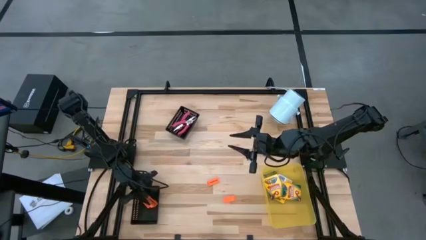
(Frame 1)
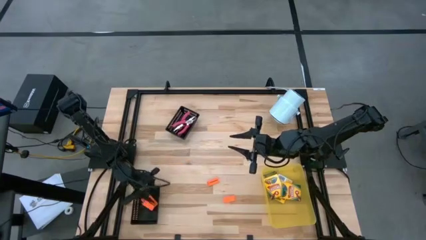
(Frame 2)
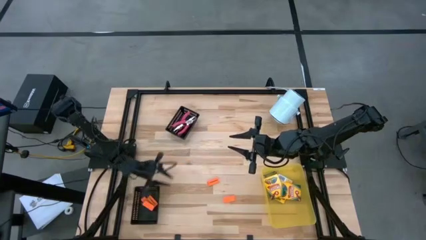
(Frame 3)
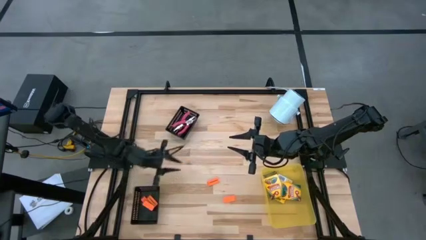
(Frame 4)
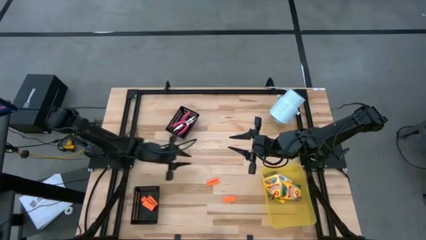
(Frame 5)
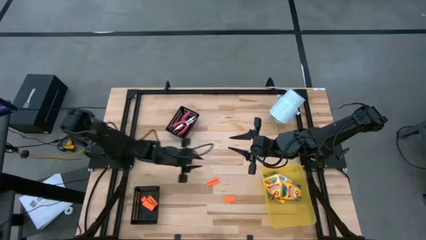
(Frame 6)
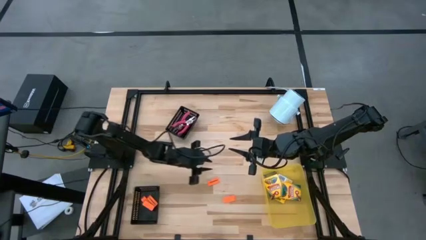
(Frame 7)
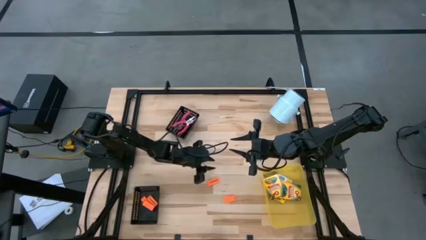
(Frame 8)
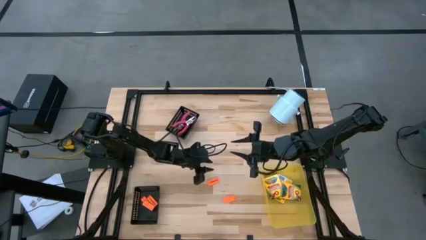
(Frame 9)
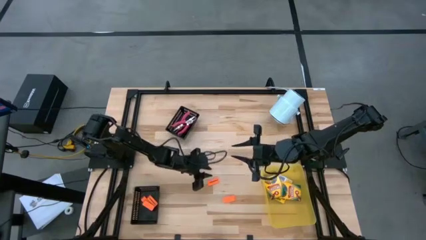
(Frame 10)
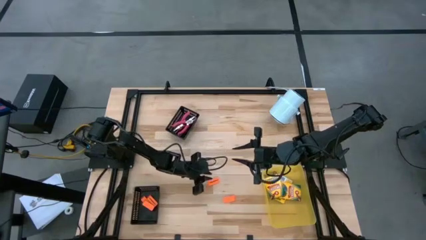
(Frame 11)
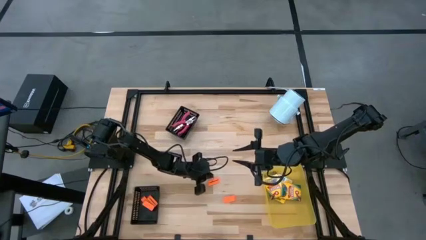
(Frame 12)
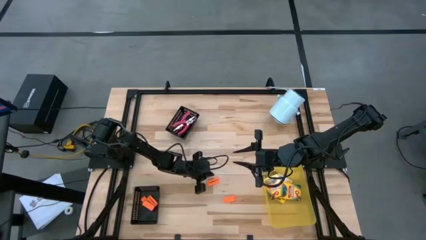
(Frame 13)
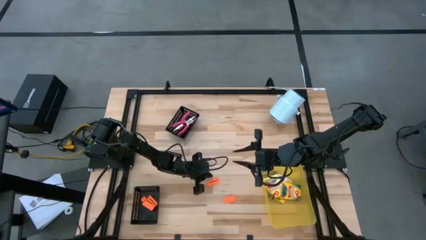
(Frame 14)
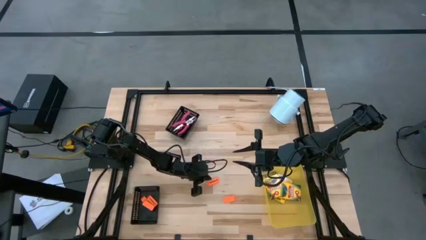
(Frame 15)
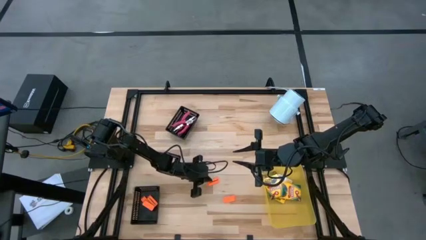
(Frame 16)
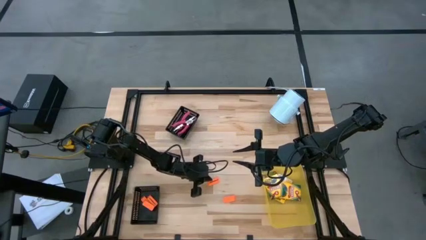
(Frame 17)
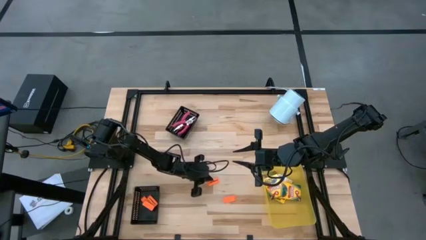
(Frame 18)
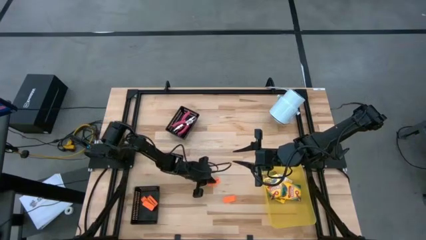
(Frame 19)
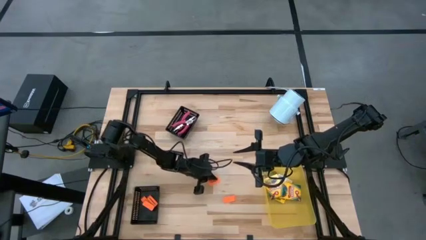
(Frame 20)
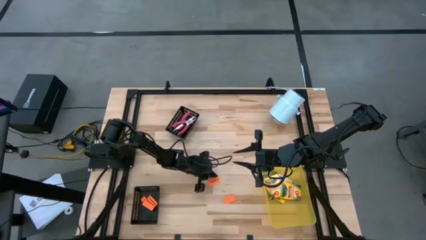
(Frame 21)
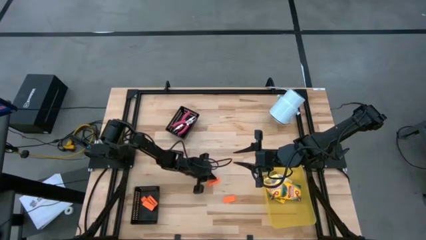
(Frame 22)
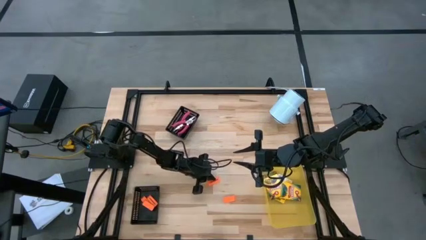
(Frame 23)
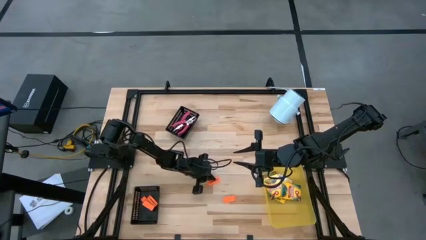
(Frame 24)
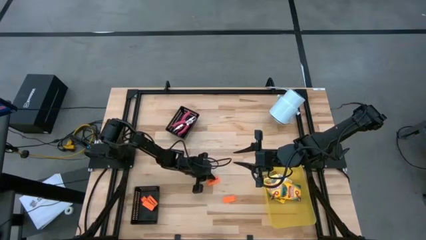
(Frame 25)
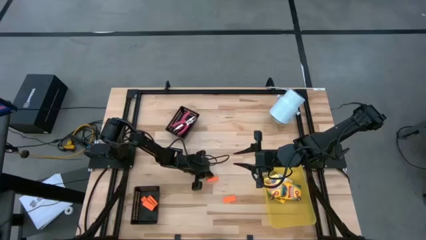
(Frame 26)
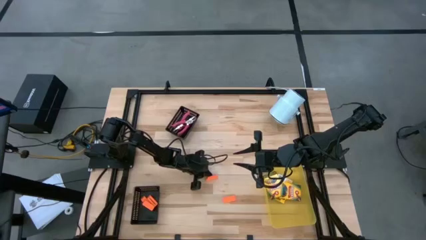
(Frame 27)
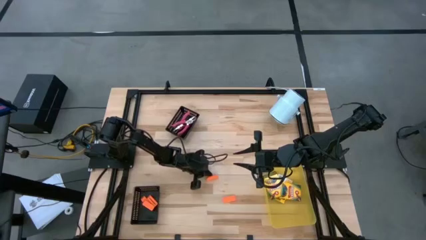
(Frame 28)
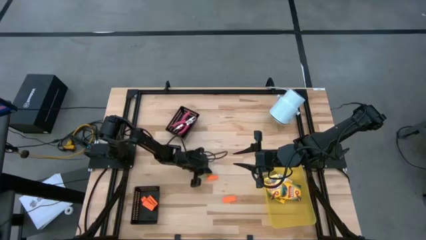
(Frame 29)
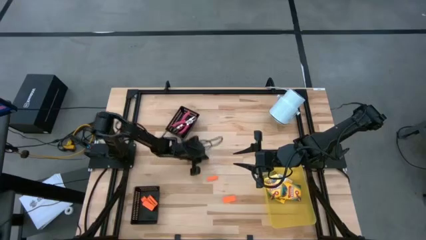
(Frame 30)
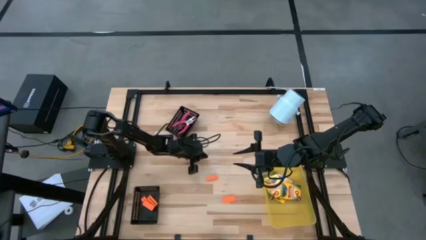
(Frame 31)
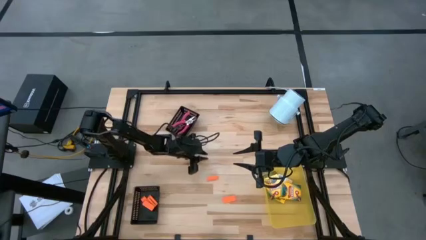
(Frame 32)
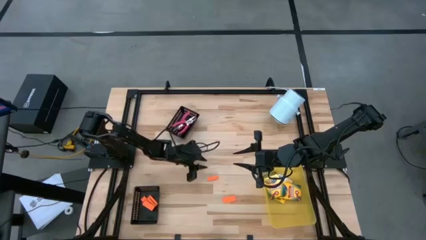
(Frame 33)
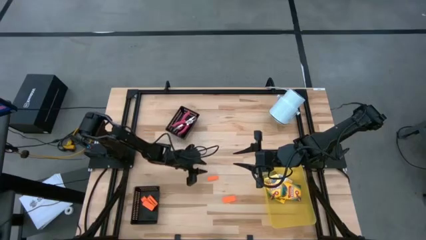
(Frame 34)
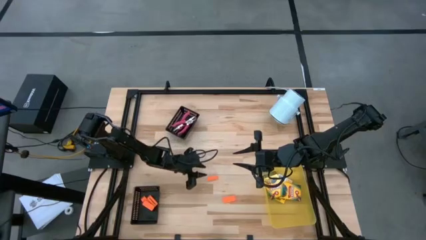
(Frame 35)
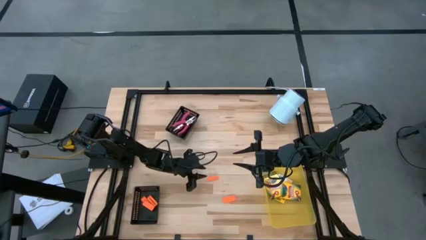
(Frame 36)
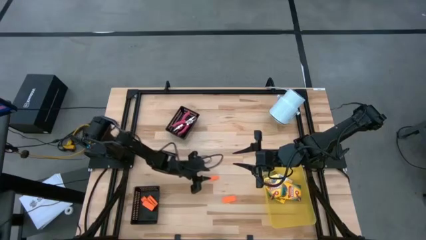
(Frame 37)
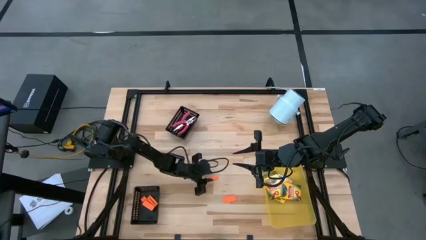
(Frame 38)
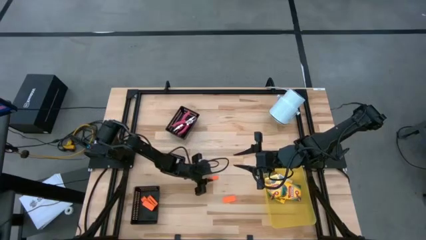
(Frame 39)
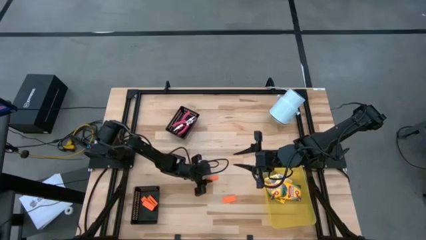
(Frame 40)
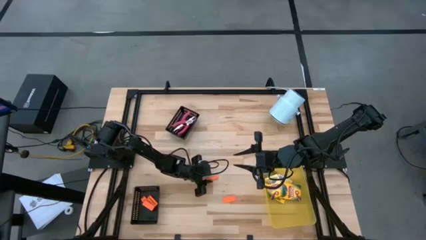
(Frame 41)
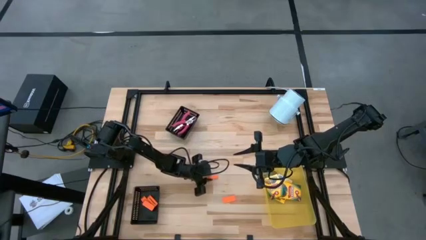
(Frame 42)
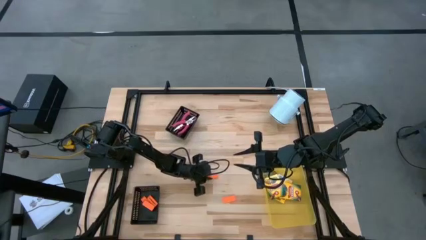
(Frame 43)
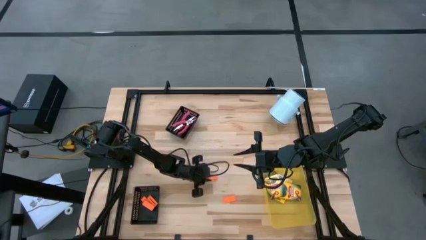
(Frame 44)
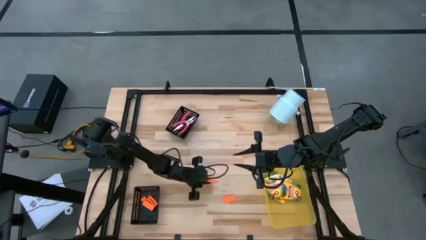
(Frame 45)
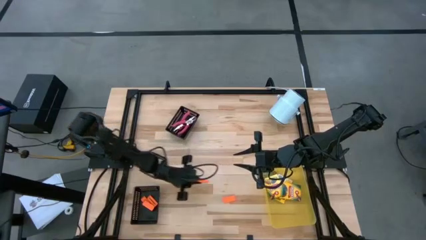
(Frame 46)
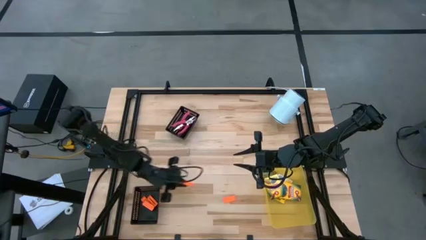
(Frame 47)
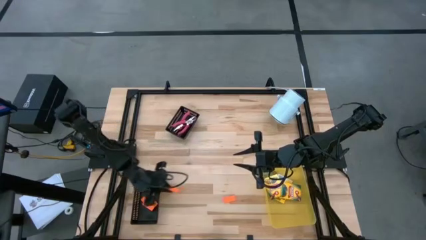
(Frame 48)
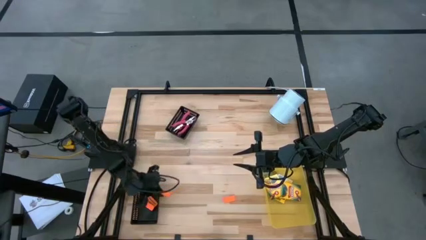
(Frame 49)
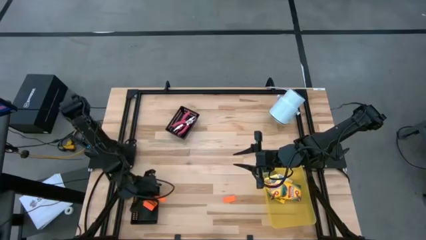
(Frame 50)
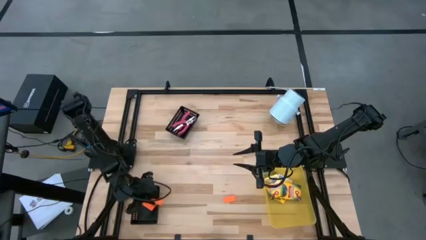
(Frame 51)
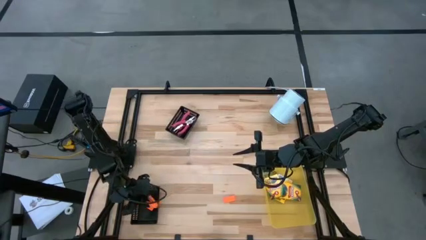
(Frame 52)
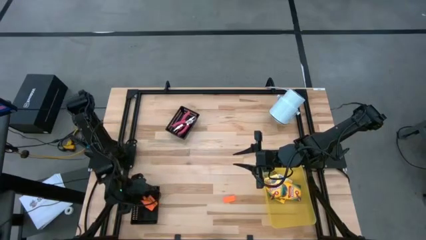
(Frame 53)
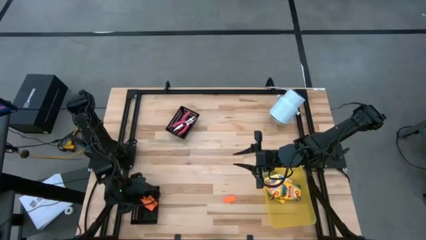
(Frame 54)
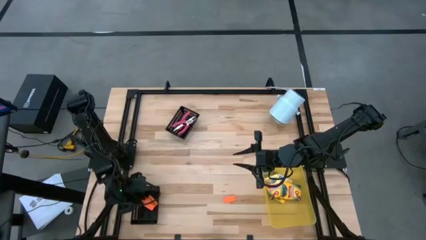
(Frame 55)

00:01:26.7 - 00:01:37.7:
Task: Pick & Place School Supplies
Put the orange eraser into the bottom black basket

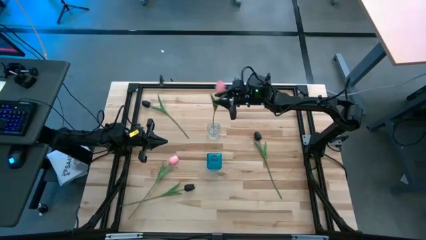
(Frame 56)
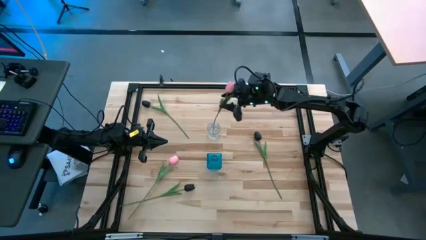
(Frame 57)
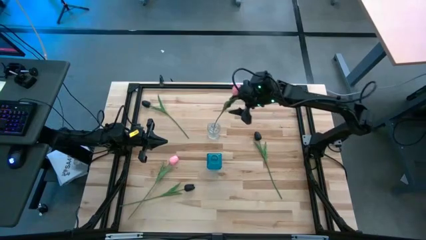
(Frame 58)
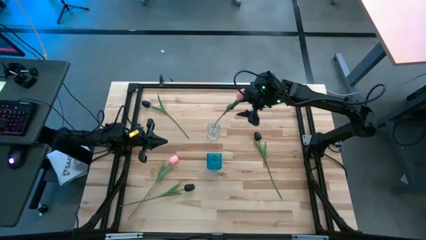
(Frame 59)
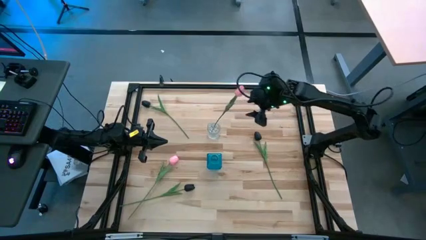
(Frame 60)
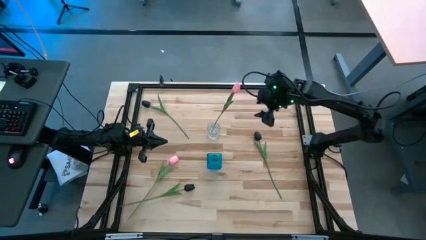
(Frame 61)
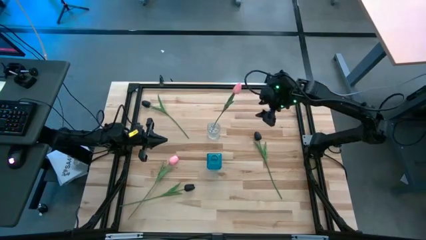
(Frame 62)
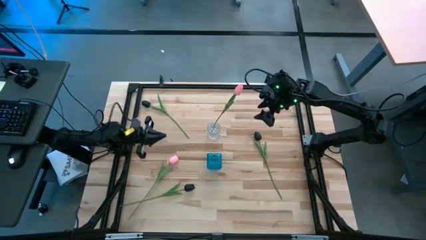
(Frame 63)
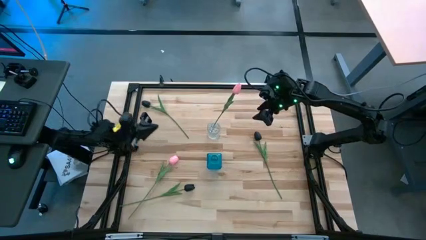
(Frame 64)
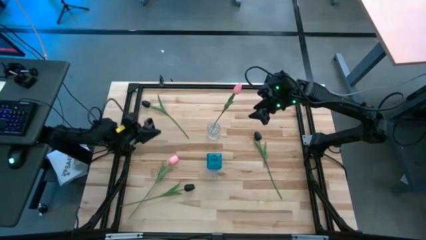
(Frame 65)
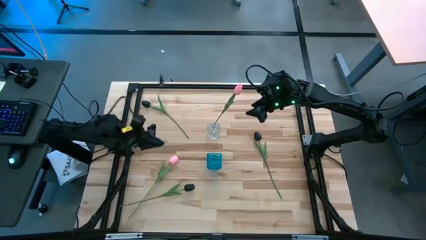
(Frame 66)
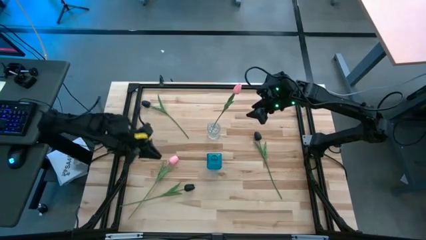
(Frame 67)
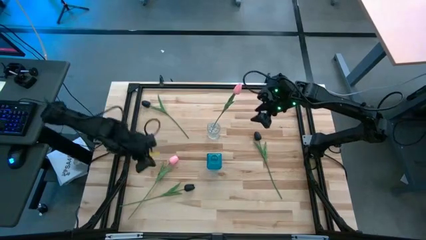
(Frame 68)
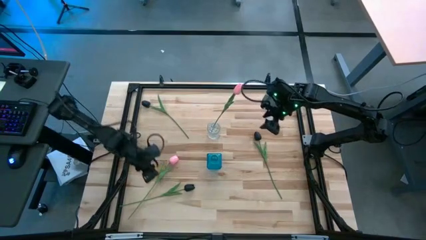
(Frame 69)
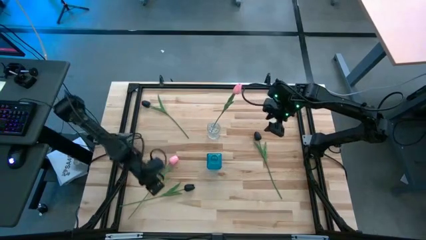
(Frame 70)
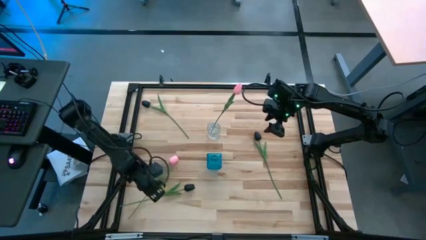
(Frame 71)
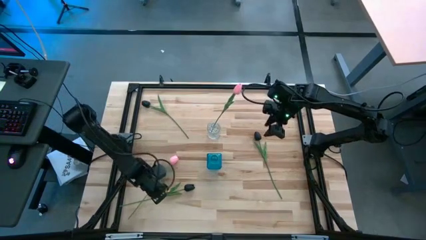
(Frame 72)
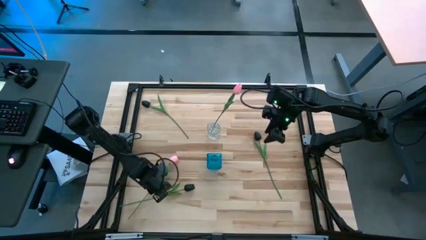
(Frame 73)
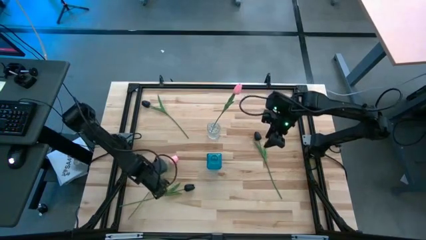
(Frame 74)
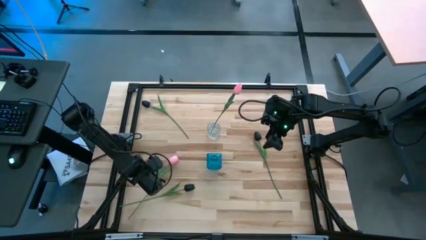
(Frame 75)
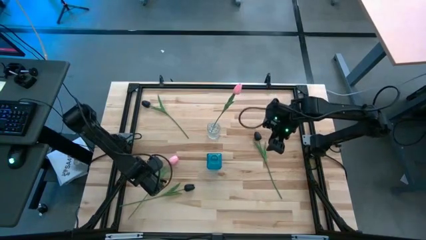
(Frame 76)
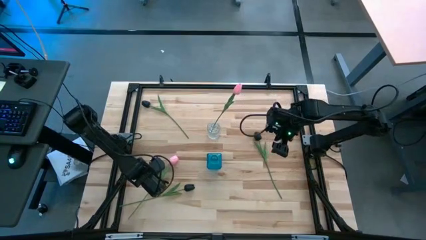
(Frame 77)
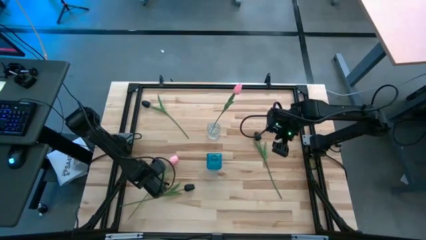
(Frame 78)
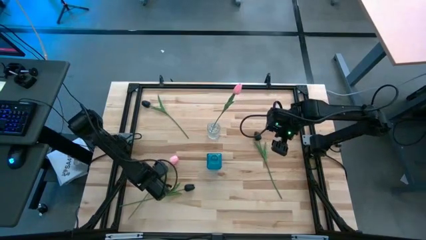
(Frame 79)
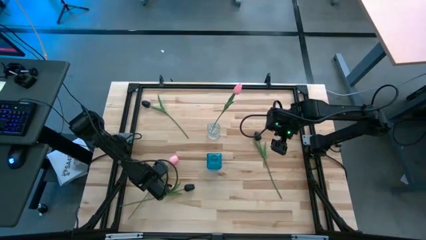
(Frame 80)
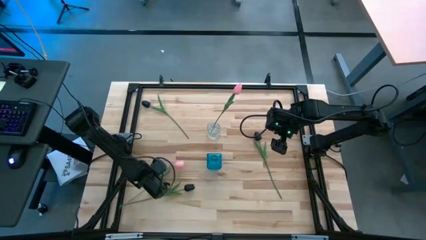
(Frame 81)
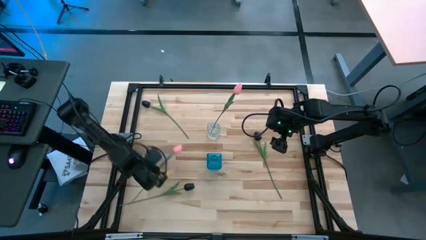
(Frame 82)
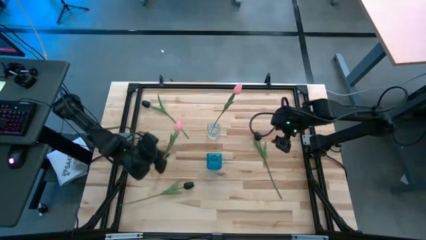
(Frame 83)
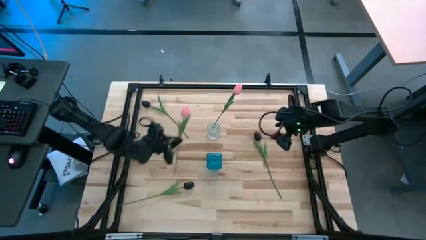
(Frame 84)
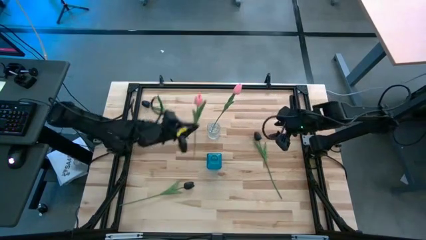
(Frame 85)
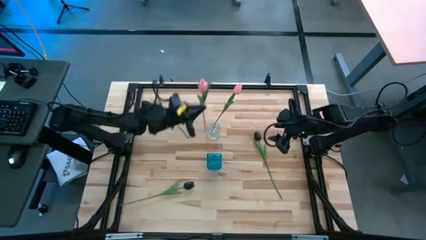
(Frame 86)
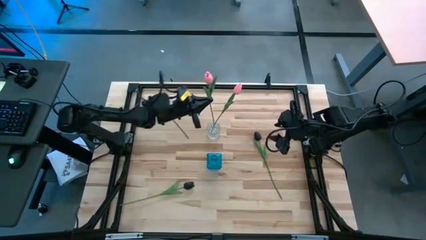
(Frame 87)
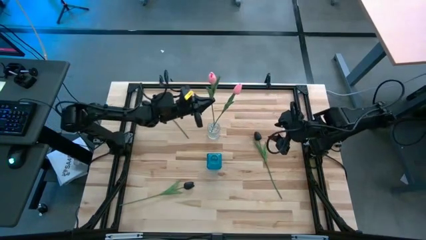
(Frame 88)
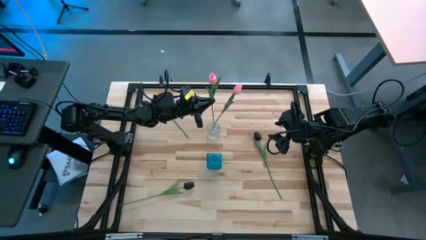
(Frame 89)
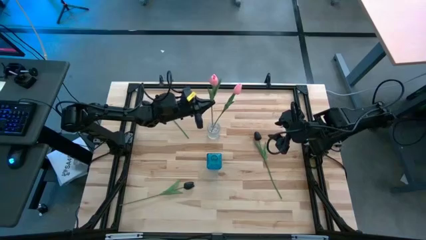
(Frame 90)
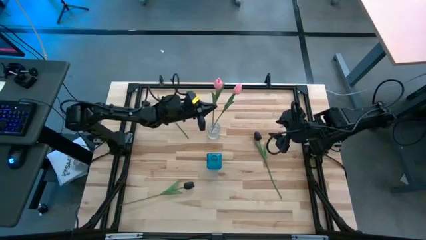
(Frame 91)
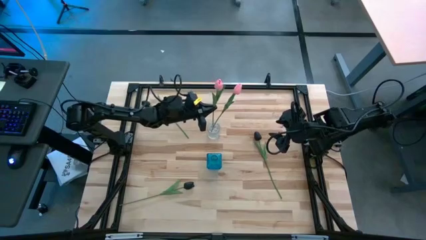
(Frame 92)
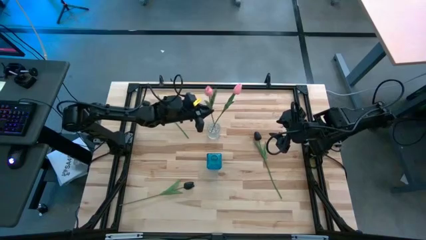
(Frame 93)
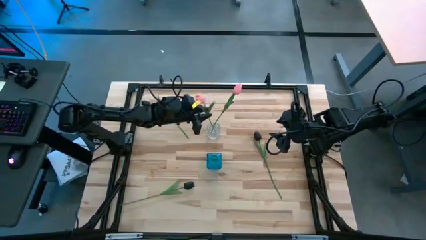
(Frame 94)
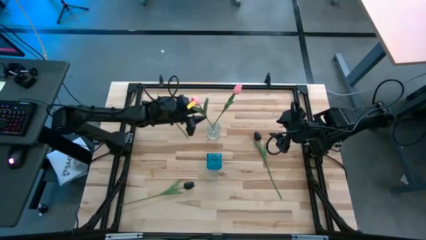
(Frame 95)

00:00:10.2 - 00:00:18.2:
Task: Sort flowers into vase by color
Put the pink tulip into the transparent vase
